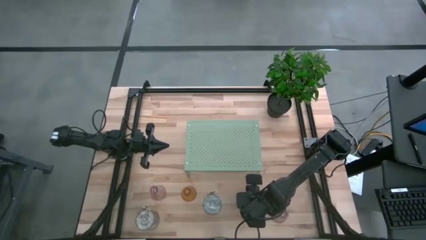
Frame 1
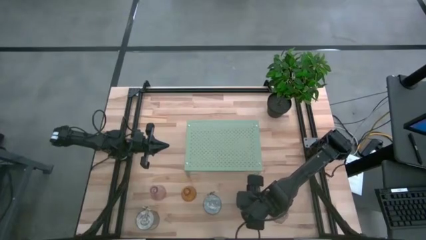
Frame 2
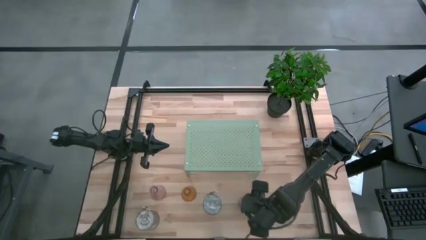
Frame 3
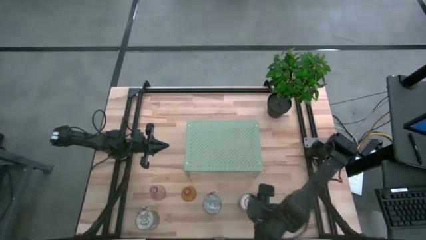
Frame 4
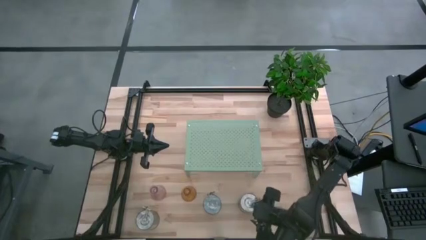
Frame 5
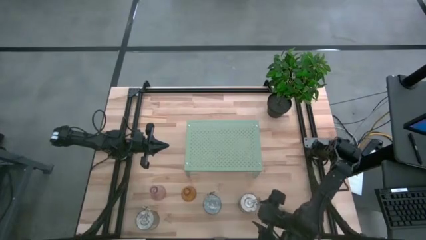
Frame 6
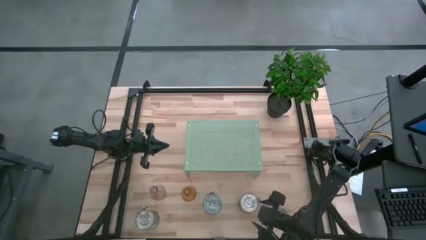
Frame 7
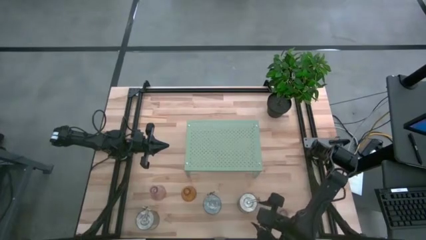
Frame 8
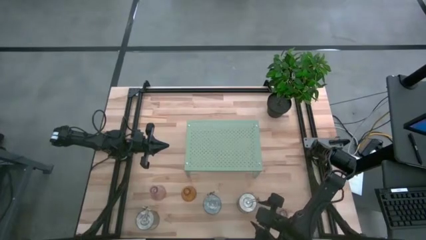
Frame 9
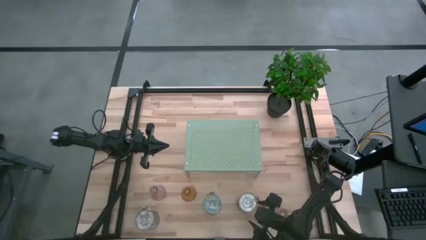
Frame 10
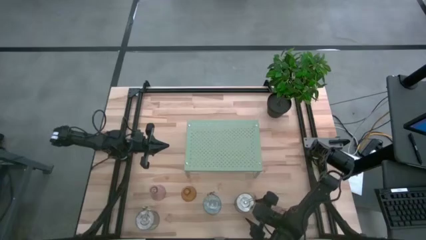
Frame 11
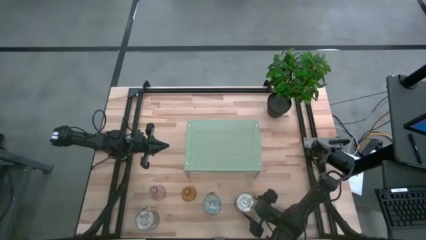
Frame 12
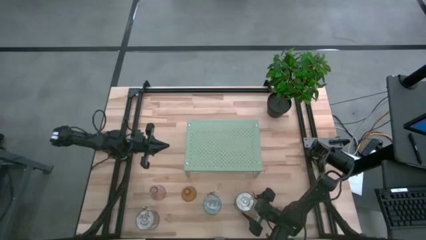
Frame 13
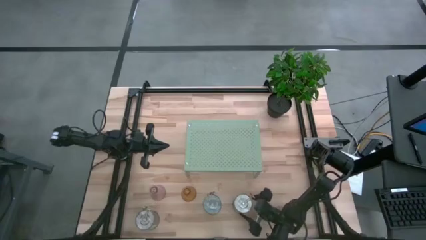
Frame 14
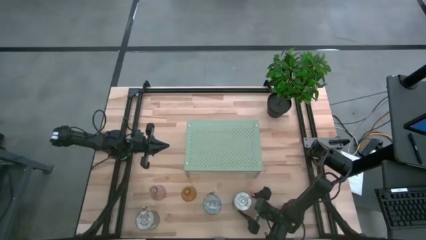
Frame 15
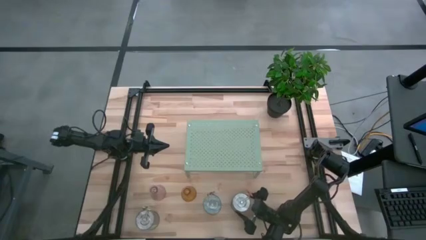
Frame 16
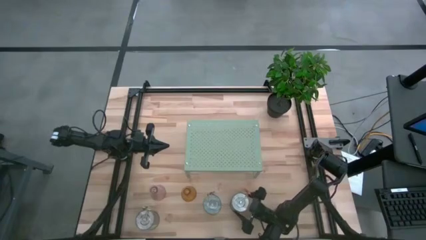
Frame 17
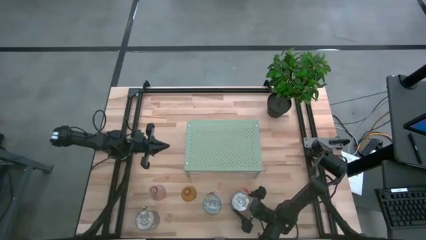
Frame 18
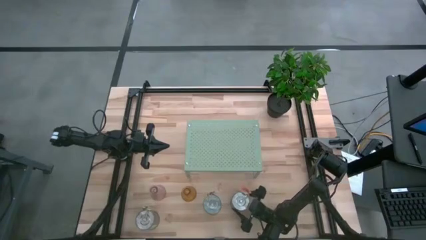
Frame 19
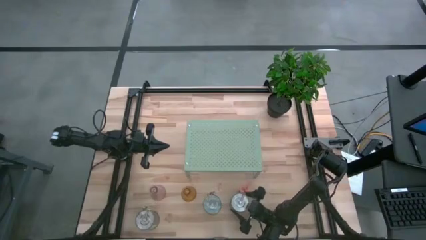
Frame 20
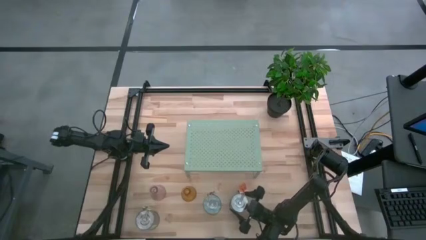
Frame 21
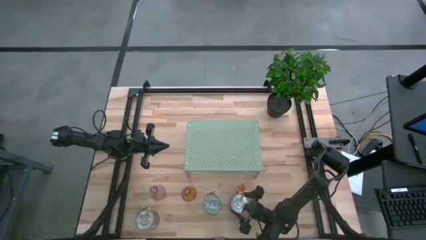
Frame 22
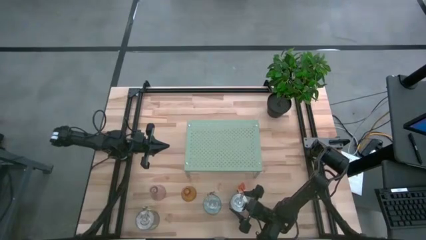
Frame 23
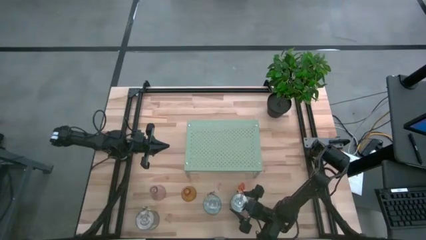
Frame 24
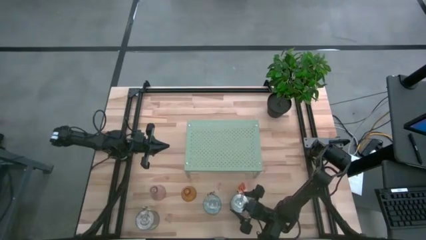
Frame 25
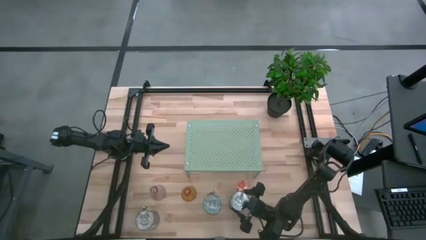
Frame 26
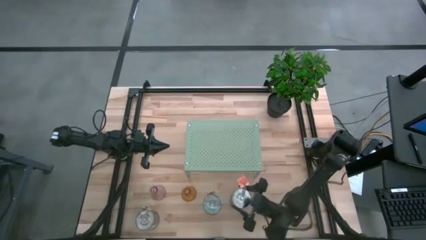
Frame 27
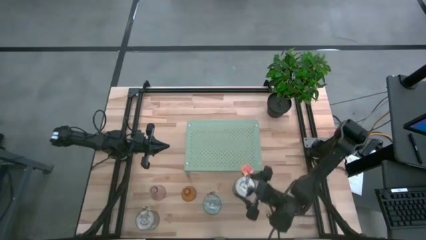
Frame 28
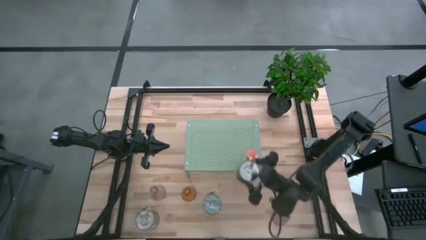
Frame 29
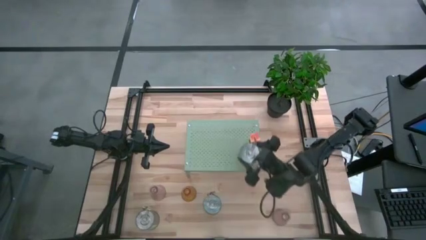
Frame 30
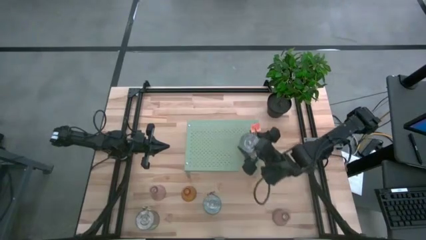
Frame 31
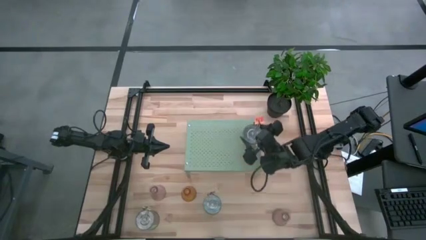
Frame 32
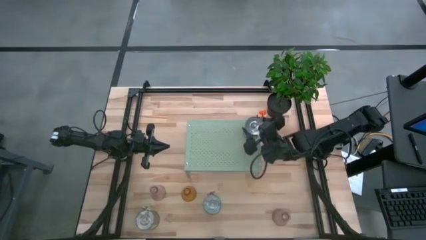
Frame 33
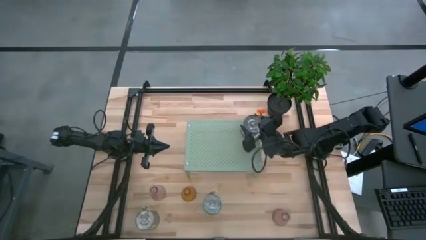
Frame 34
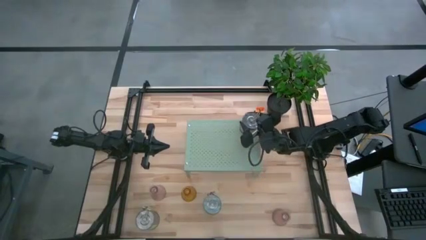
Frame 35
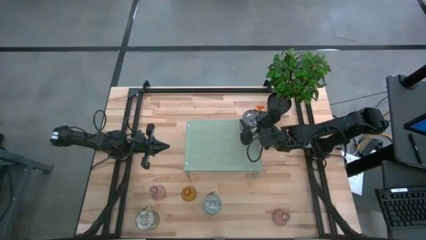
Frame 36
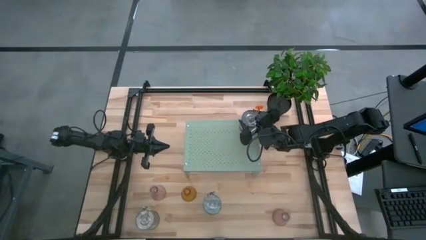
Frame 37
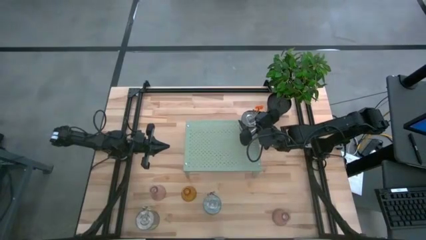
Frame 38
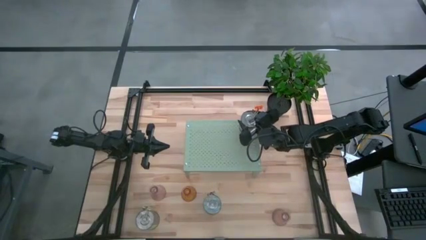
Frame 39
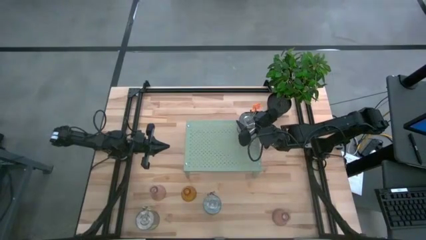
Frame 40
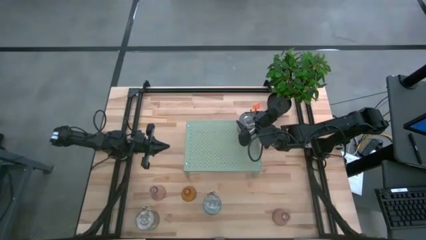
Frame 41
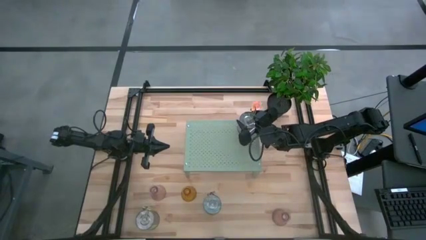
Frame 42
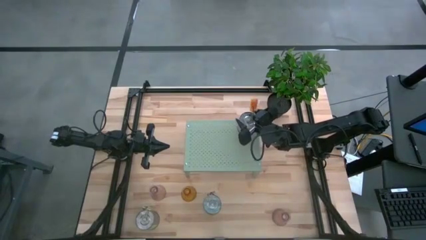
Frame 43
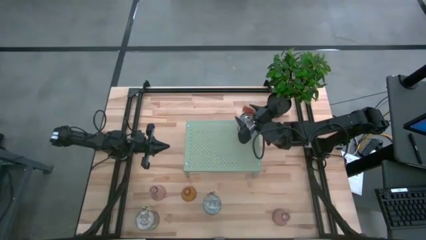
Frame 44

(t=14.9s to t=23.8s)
Task: Pick & Place candle stick holders
Put the orange scented candle on the shelf

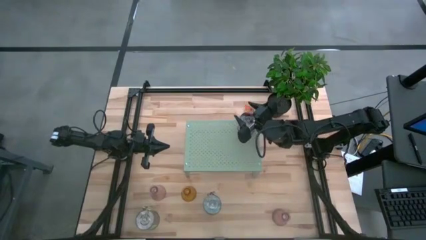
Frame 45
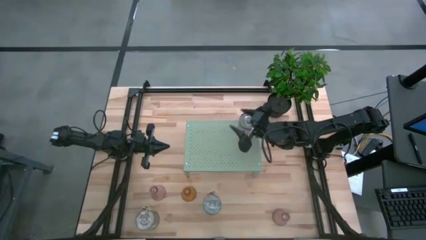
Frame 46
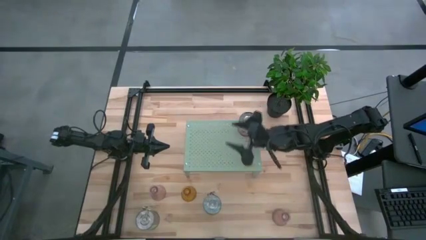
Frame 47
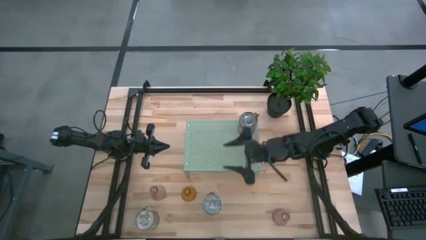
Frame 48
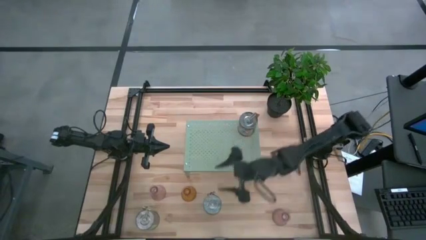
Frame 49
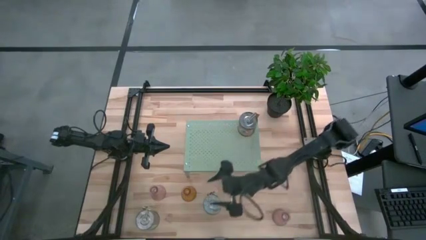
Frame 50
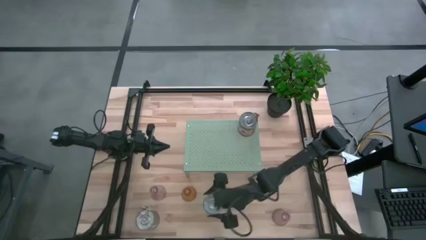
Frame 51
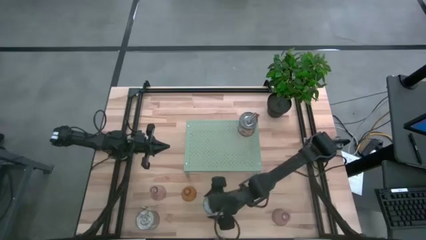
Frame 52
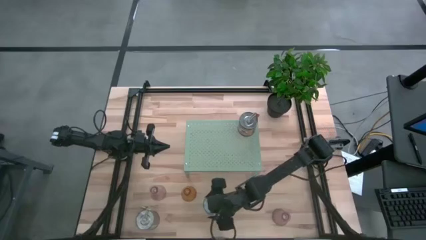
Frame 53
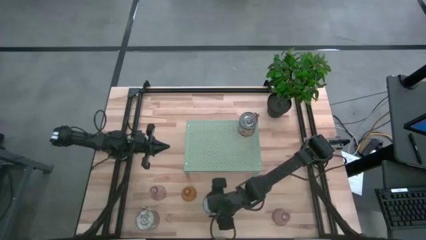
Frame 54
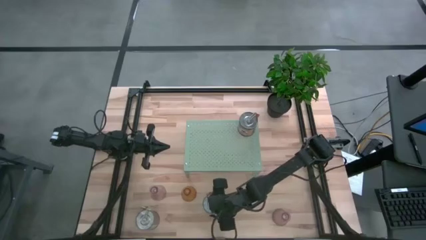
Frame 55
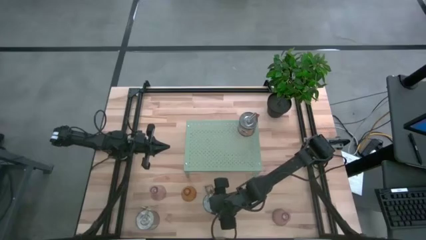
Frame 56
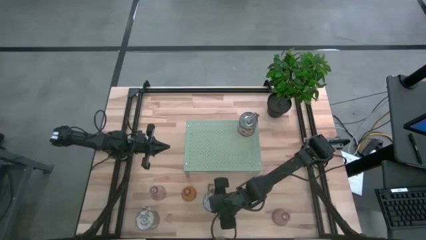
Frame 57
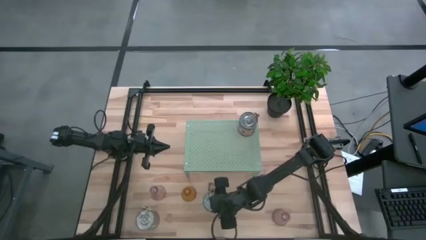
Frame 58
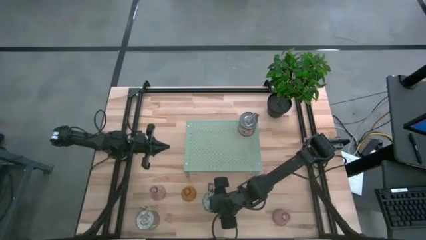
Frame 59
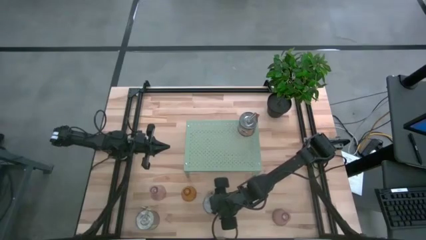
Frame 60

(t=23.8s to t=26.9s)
Put the brown scented candle on the shelf
